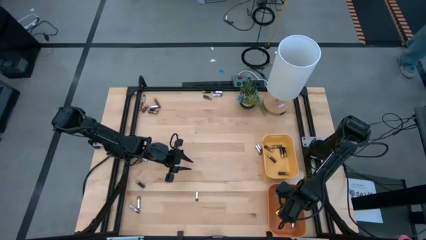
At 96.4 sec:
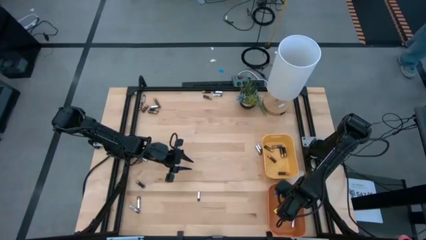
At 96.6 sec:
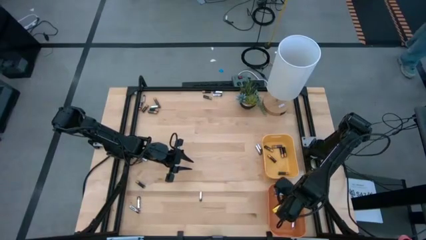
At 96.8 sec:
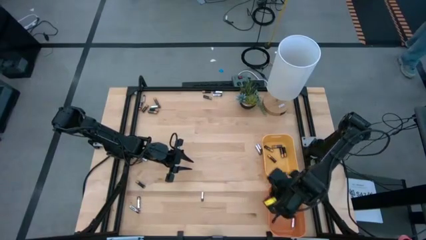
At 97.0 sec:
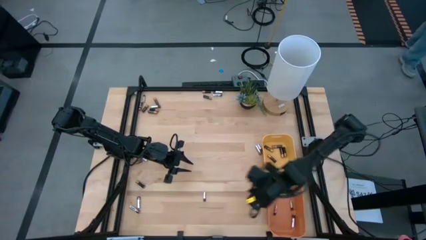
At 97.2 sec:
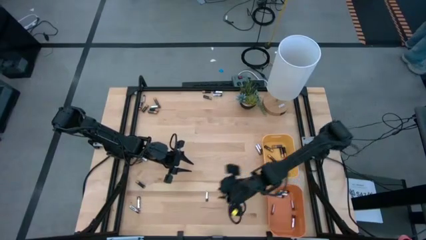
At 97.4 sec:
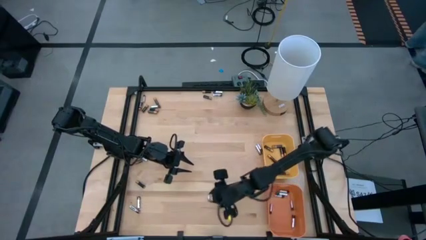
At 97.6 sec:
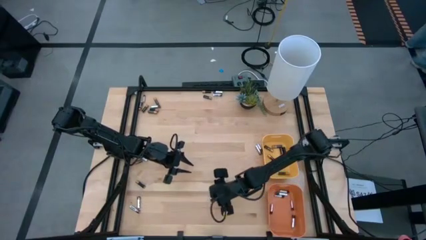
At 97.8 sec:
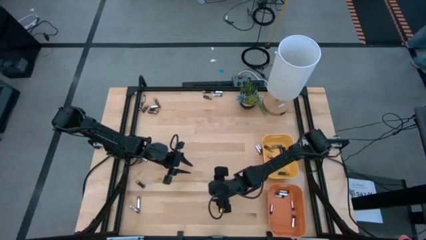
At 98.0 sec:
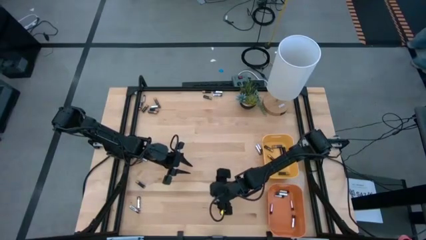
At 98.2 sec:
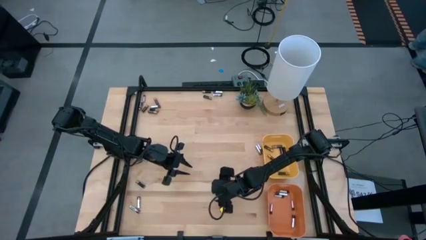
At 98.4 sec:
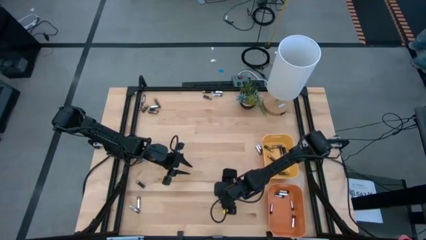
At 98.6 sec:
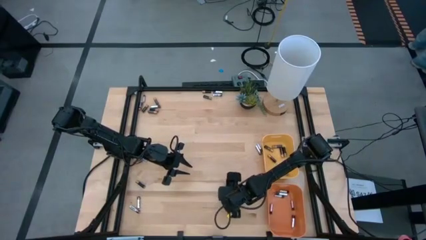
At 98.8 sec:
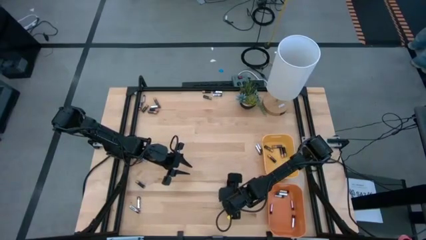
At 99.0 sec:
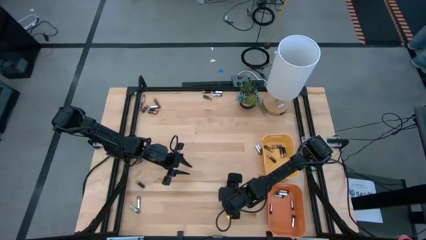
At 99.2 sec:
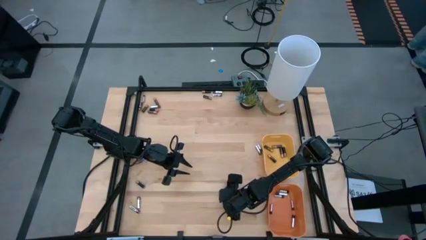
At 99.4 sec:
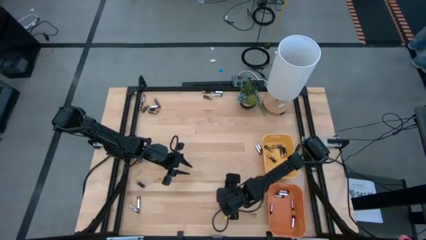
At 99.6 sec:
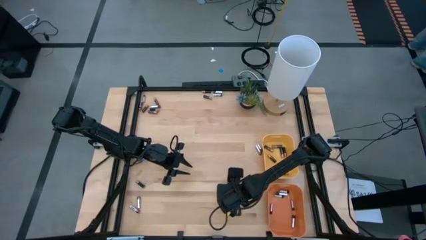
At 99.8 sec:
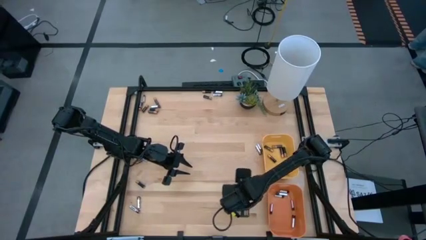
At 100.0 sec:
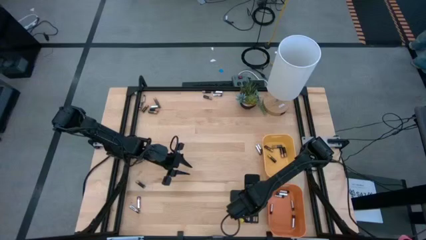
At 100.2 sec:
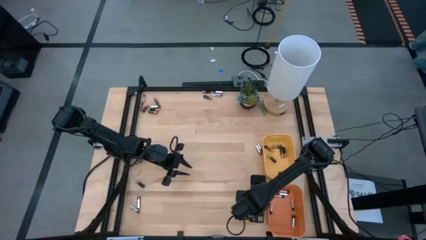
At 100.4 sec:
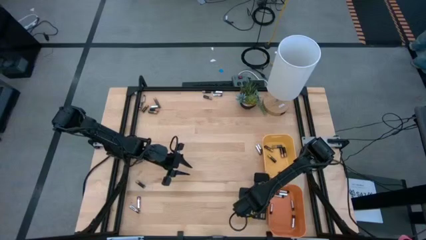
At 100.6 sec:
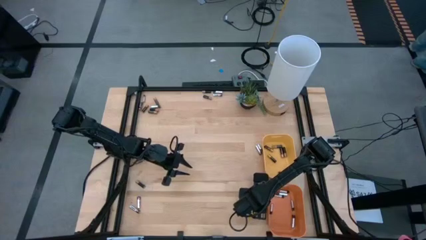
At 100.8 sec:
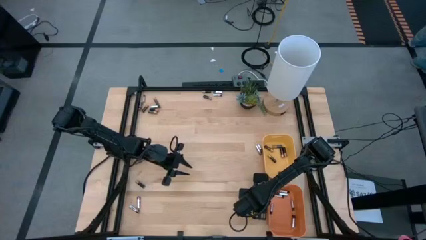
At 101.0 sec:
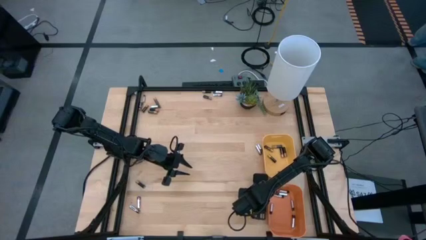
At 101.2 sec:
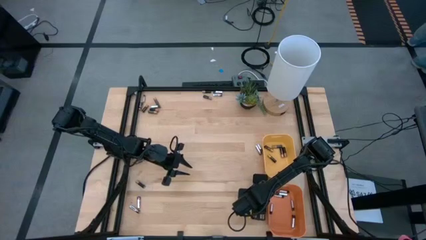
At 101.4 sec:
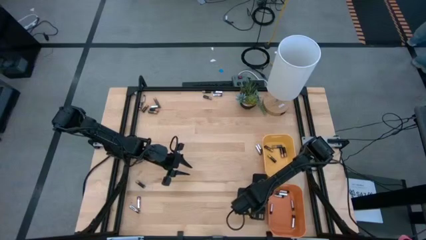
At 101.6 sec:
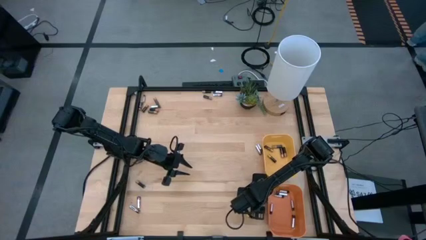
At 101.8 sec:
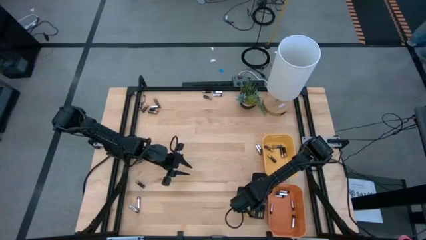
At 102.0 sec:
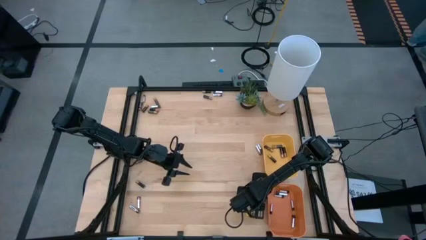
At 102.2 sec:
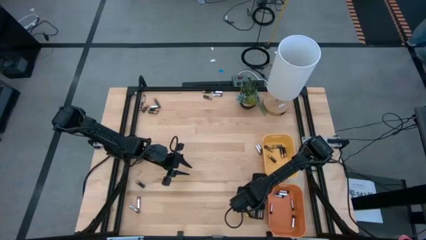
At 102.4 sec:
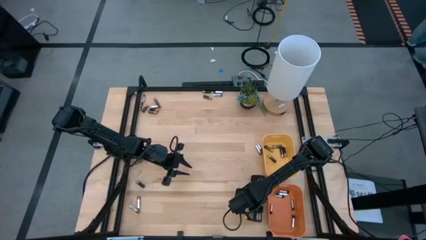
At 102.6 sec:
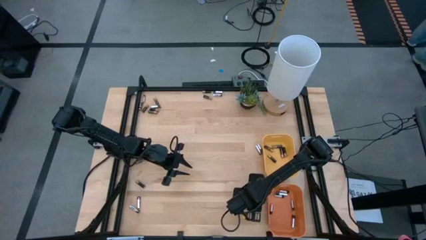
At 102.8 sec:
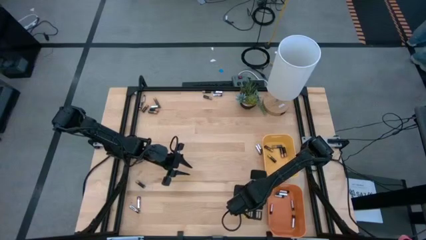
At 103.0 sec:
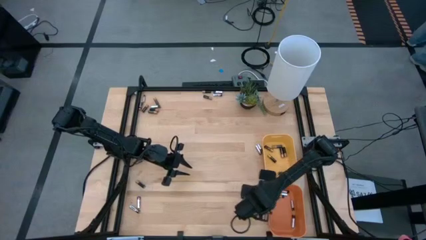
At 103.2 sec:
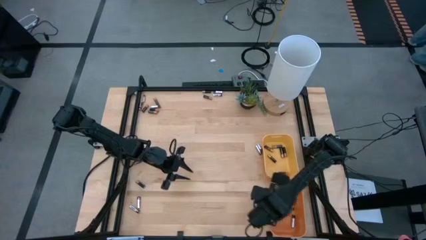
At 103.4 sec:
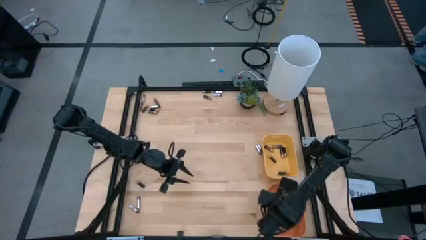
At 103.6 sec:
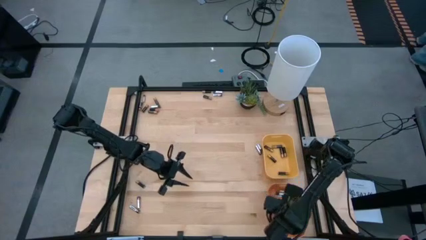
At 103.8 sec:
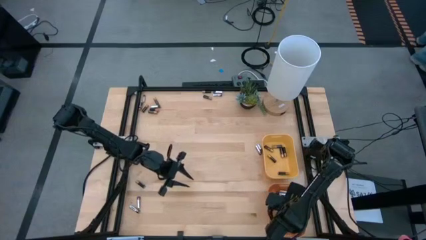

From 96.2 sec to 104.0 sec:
Task: Sort batteries
Put the black battery into the orange bin

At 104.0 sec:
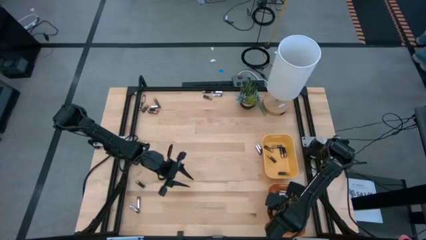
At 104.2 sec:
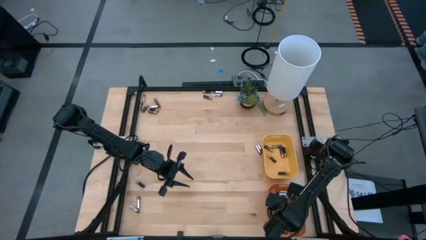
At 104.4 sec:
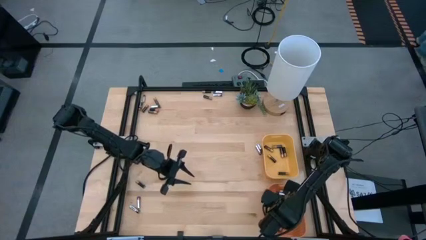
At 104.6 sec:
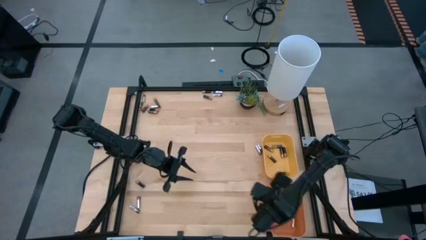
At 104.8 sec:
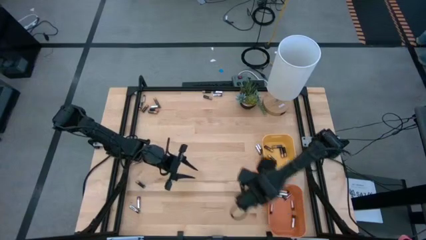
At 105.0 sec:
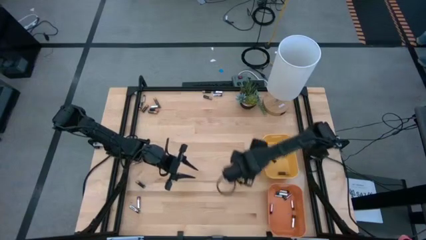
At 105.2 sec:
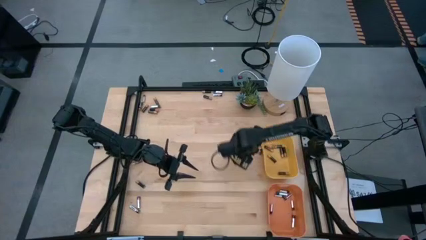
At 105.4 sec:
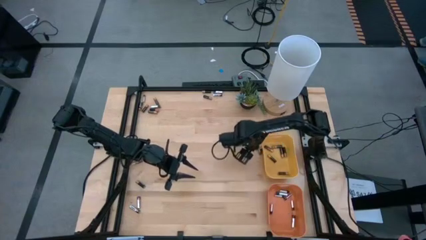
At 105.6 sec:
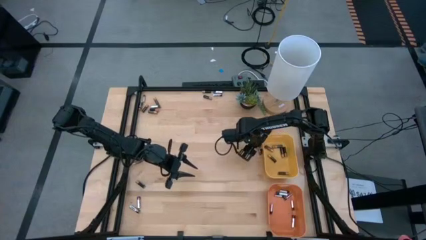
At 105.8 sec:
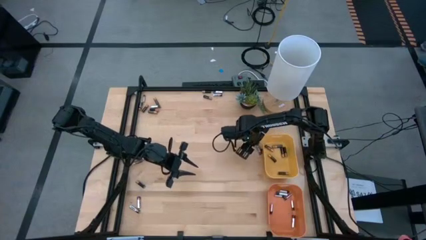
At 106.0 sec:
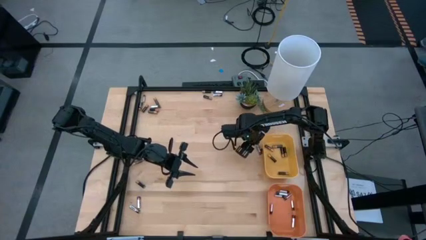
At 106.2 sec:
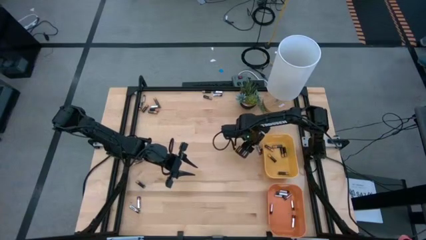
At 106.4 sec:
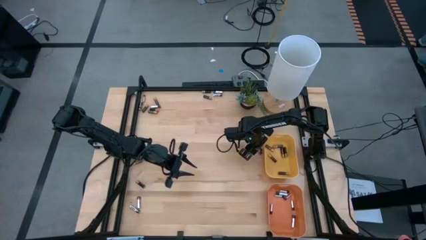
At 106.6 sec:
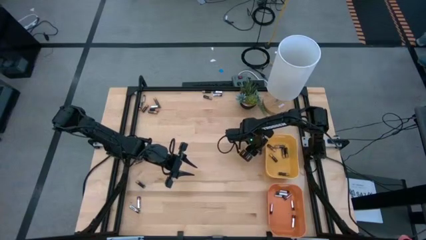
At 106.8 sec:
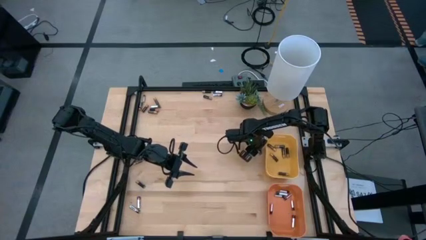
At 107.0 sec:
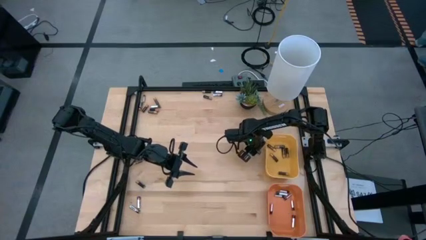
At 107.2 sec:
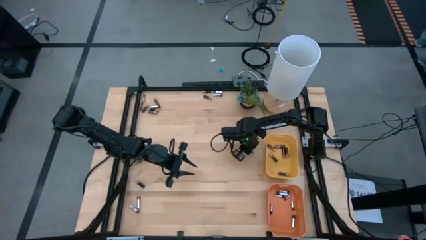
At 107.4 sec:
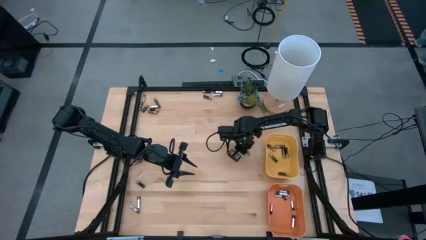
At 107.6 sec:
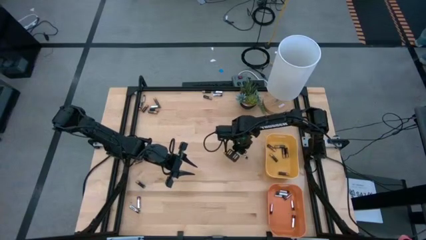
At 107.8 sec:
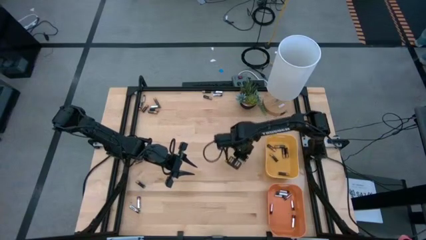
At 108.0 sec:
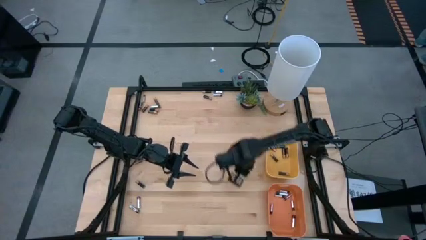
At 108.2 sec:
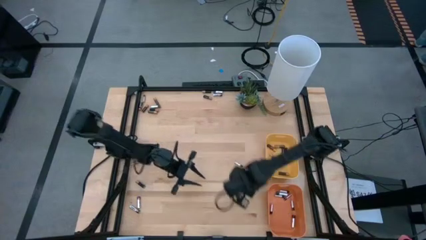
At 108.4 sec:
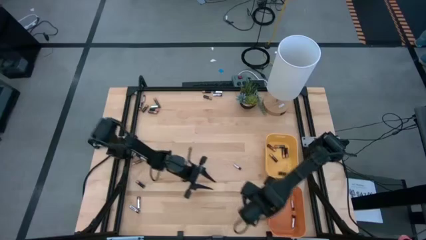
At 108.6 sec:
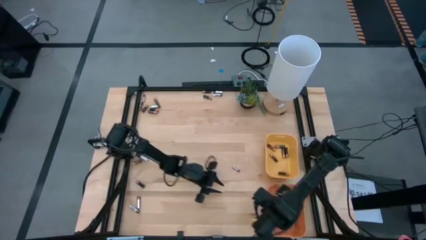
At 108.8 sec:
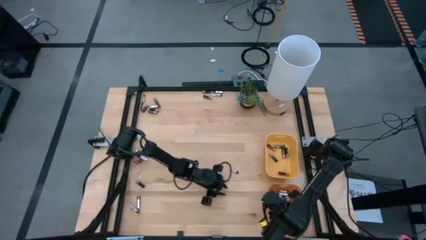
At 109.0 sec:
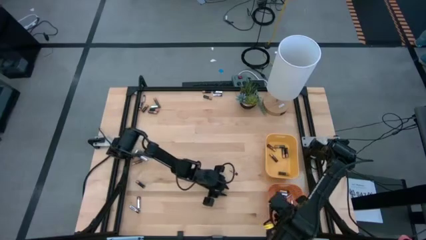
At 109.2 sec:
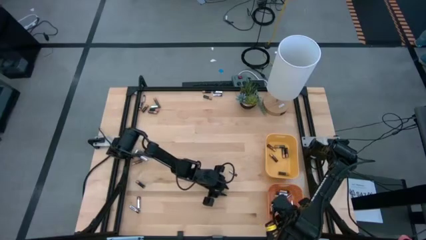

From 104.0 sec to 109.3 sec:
Put the black battery into the orange bin

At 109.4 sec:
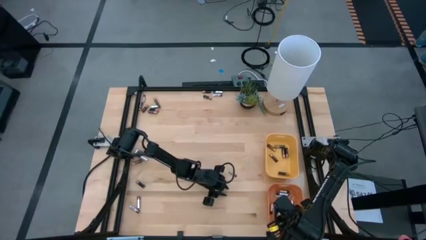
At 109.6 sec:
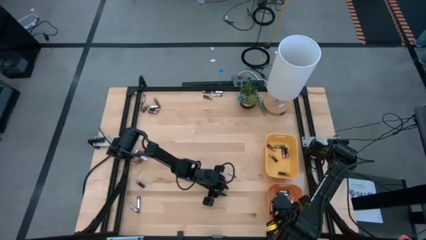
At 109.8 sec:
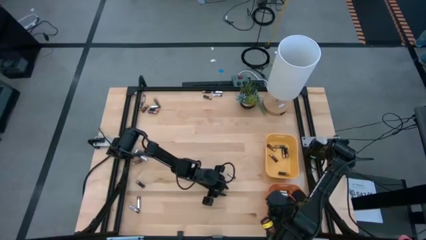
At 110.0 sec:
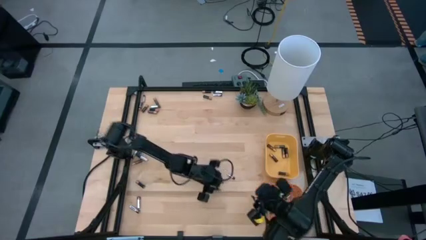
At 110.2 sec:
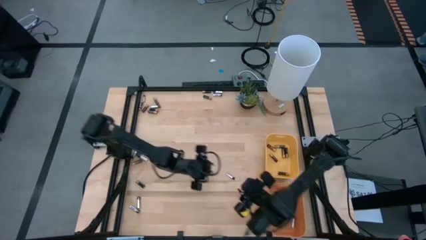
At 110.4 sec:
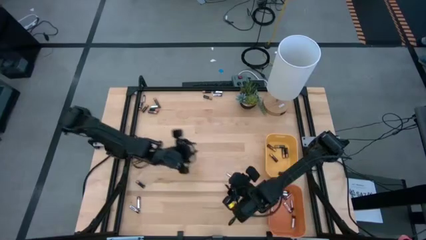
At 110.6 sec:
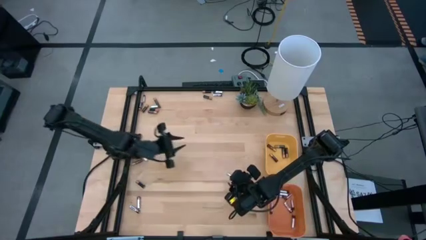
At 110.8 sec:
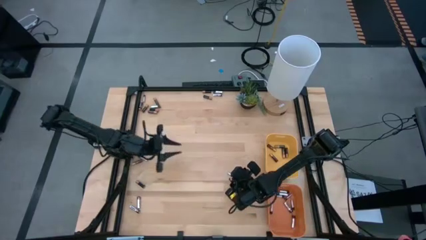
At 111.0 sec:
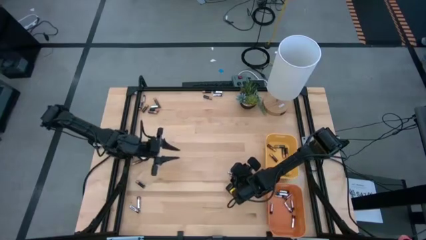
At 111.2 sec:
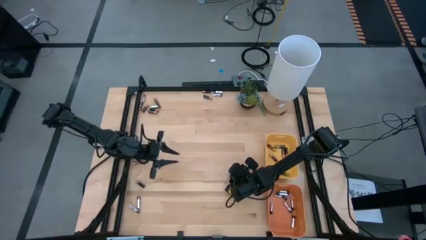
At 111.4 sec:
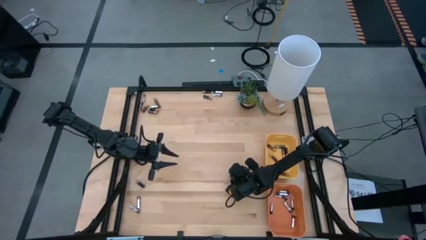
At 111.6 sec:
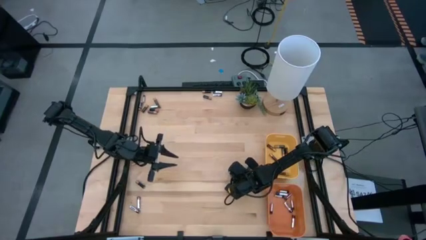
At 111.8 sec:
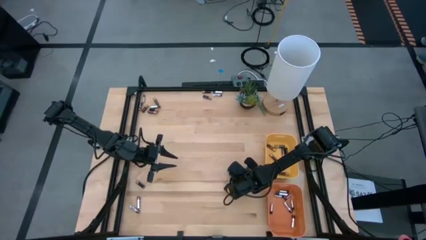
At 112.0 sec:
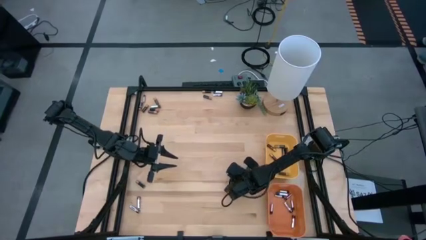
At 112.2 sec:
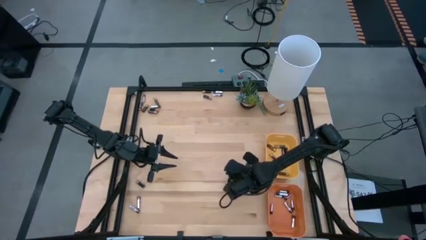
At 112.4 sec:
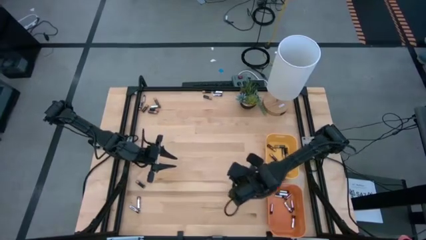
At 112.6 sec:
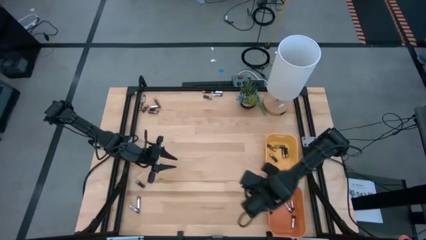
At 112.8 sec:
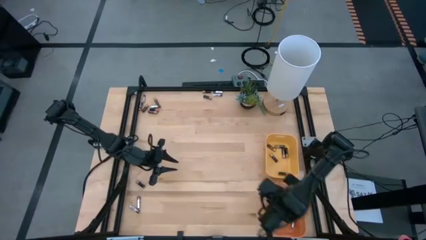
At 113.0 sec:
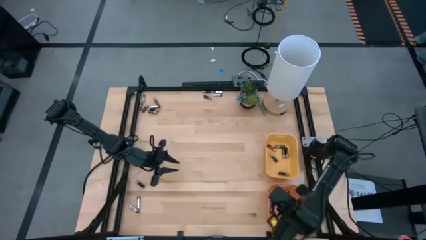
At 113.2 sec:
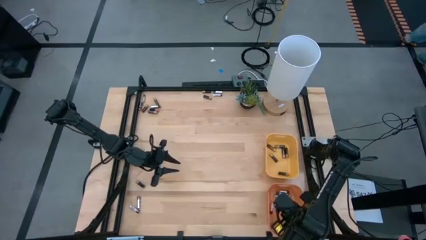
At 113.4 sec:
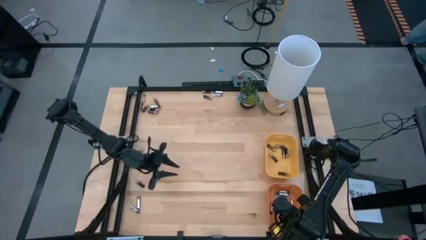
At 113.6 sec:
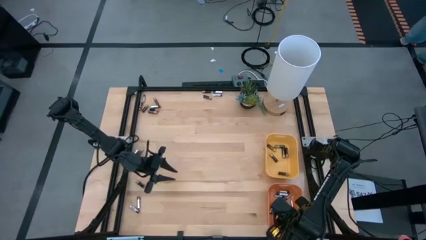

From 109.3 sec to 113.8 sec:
Put the black battery into the orange bin
